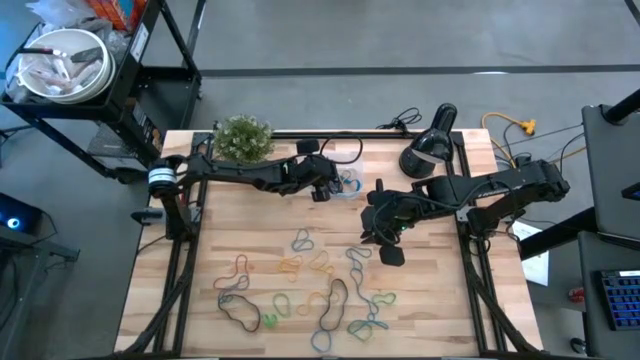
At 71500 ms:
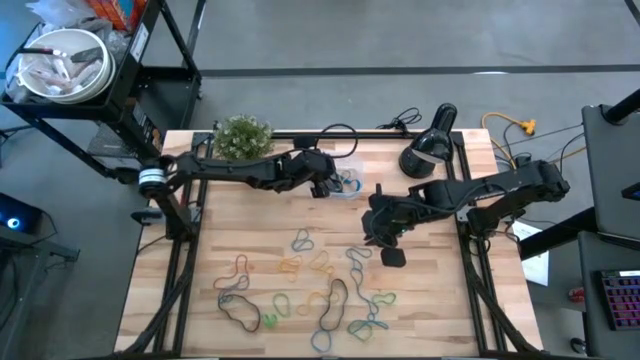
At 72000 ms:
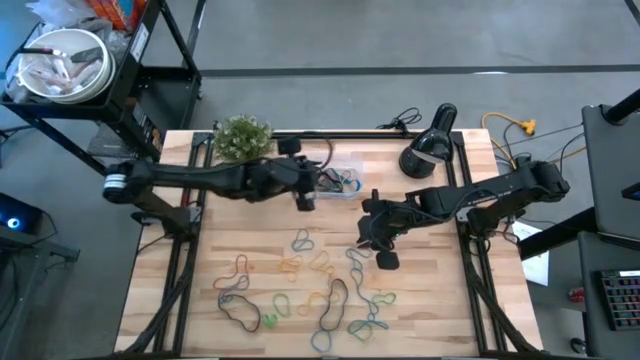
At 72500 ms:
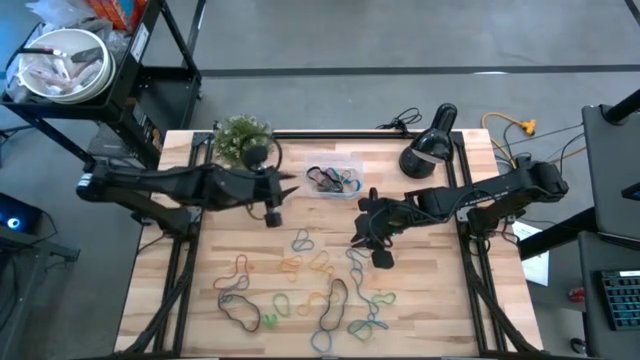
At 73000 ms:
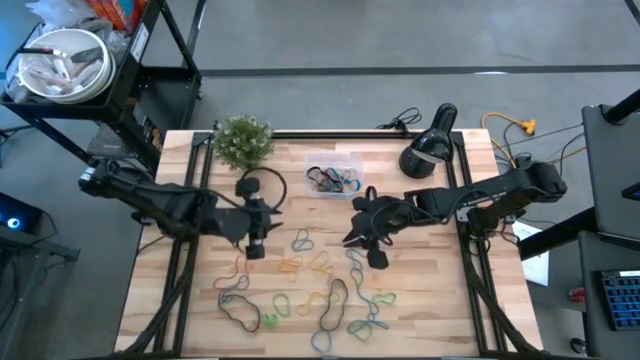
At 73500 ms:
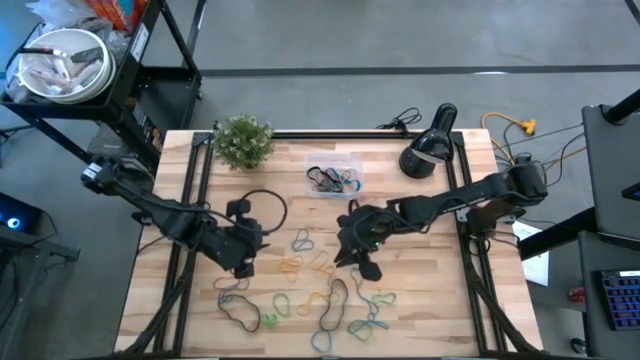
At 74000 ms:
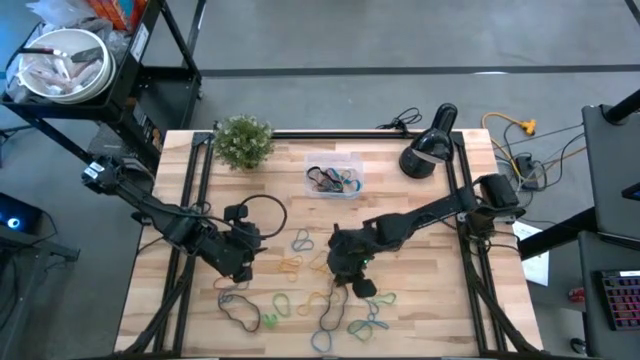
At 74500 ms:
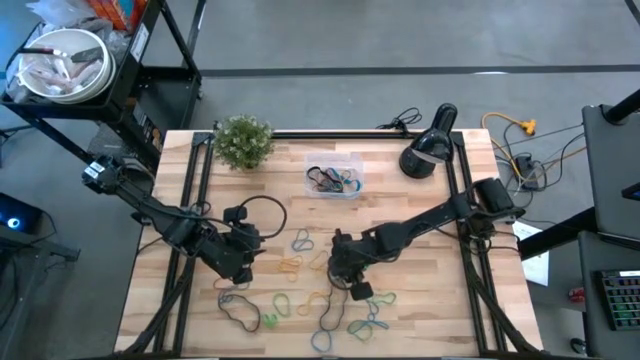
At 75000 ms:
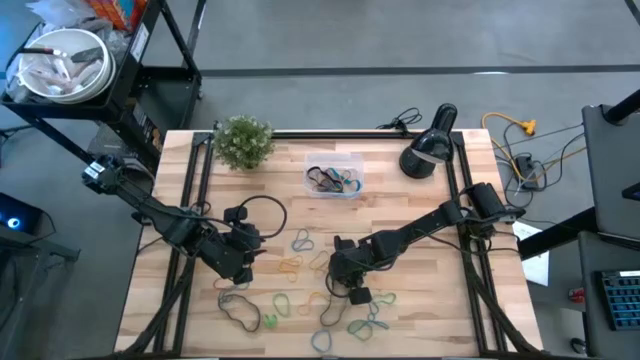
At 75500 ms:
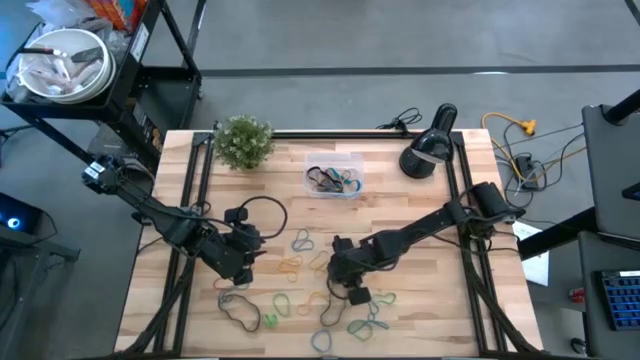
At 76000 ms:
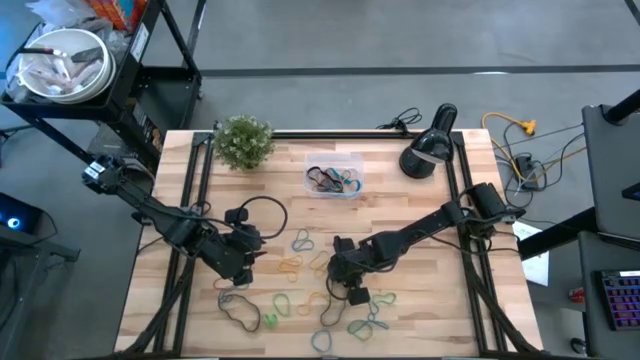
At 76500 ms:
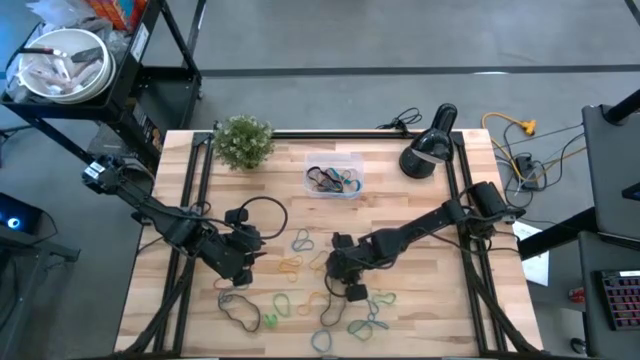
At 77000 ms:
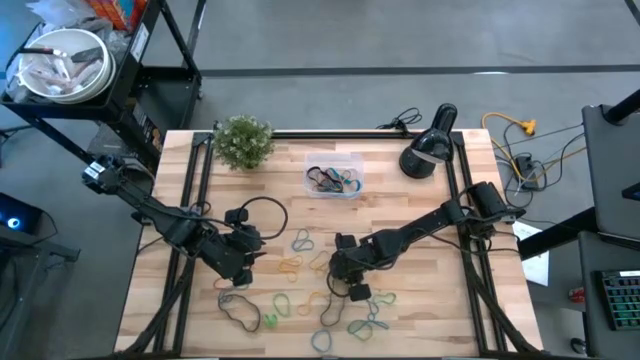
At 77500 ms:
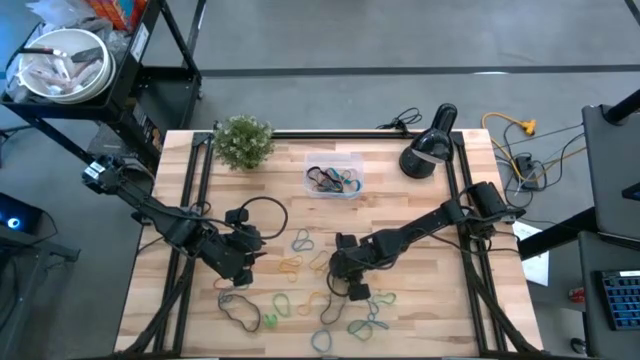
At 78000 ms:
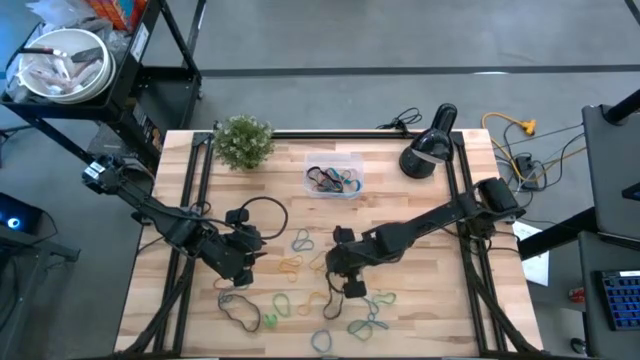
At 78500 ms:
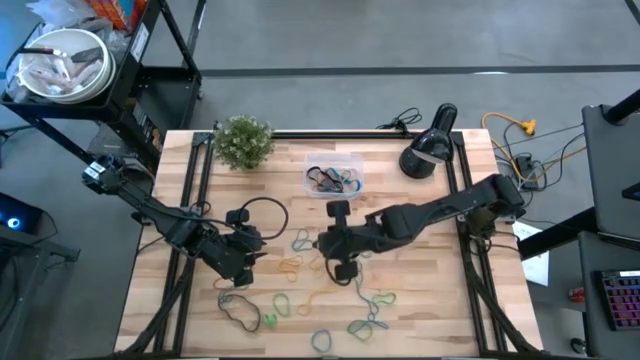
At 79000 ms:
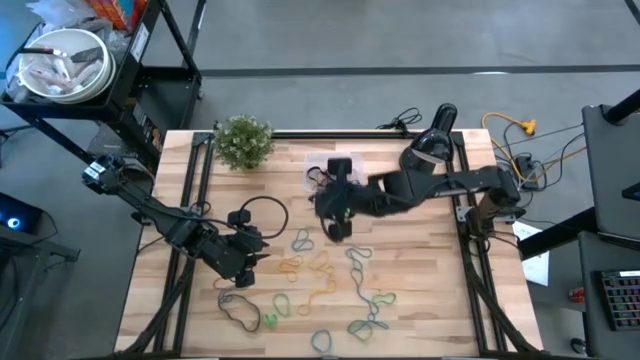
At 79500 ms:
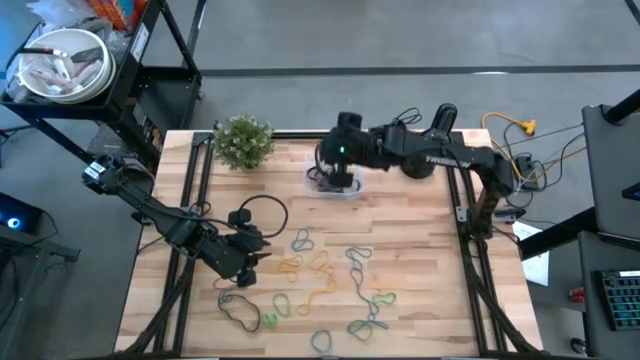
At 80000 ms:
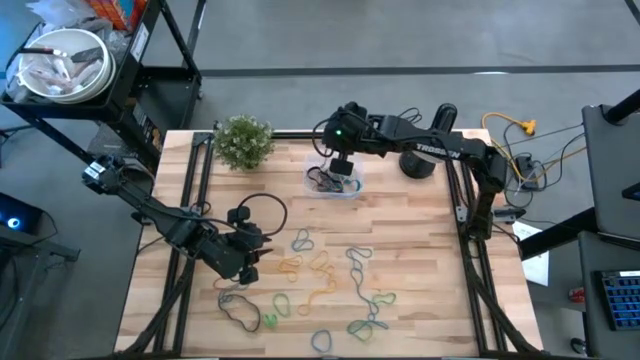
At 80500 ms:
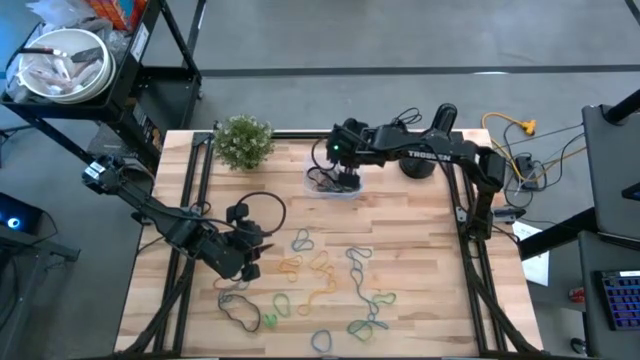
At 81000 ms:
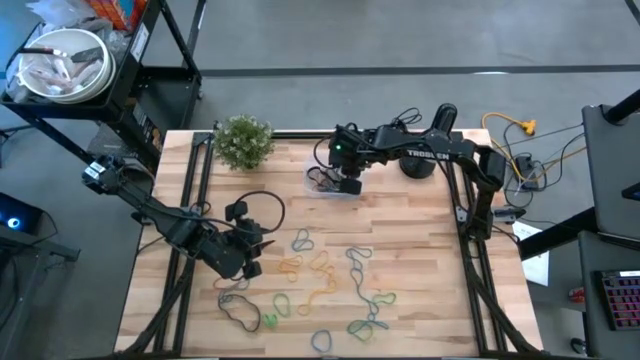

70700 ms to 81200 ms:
Task: Pick and place rubber bands into bin
Put the black rubberband into the transparent bin

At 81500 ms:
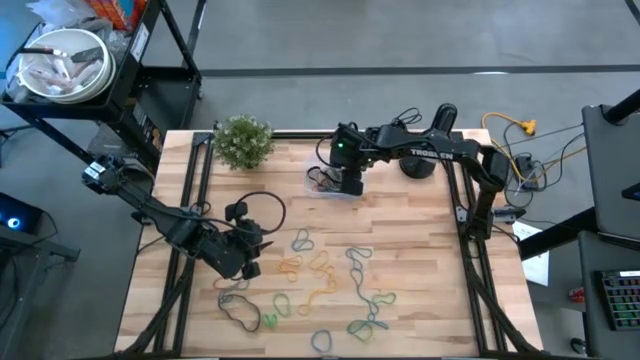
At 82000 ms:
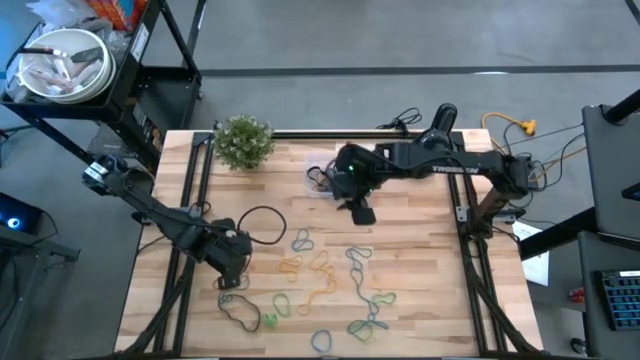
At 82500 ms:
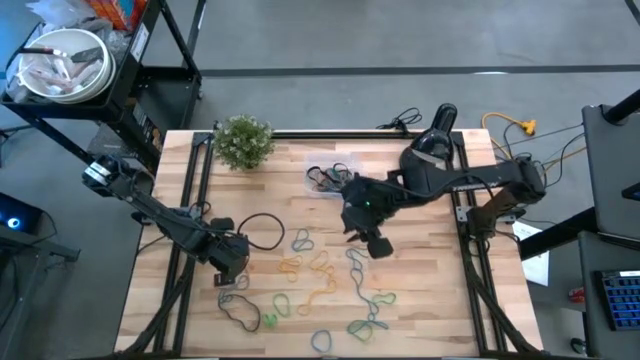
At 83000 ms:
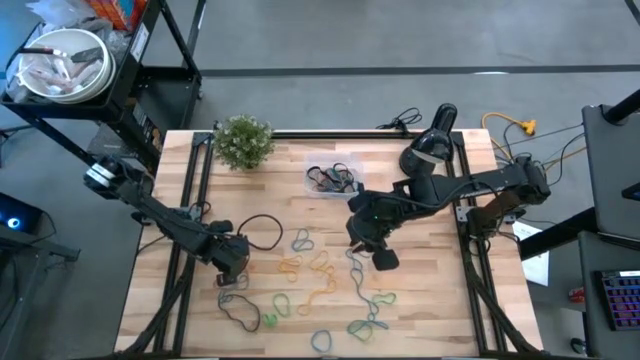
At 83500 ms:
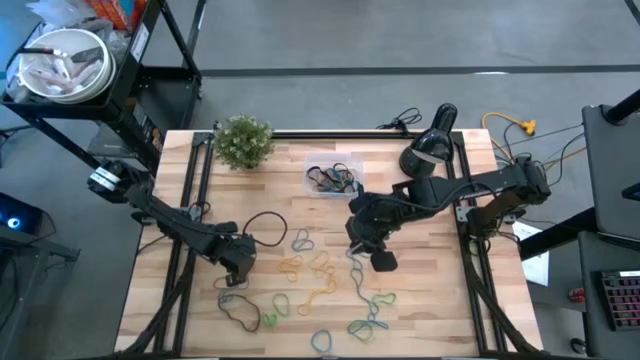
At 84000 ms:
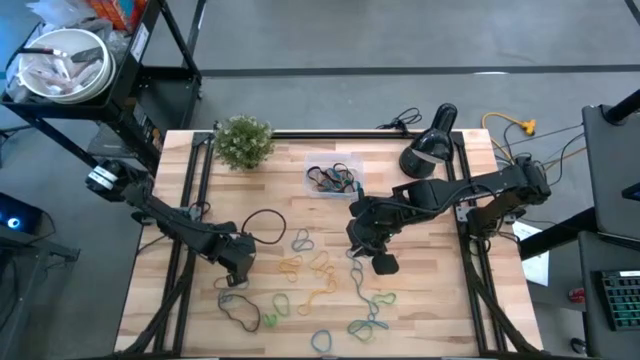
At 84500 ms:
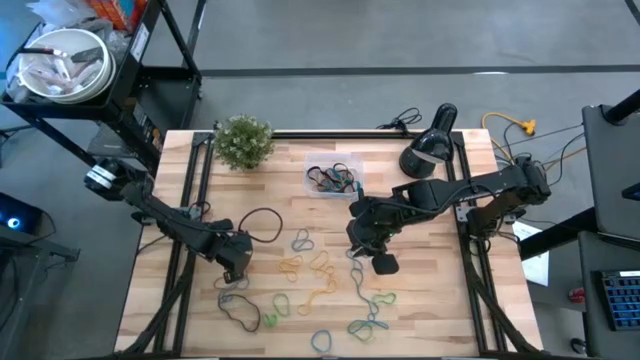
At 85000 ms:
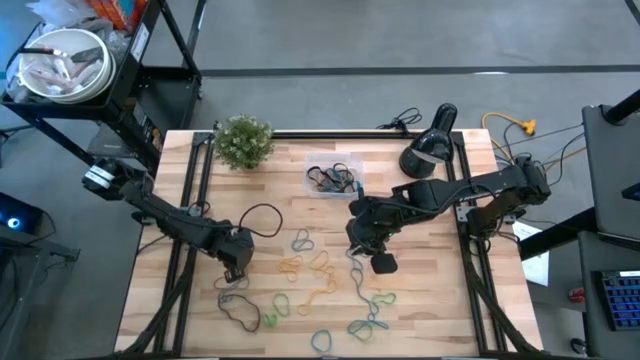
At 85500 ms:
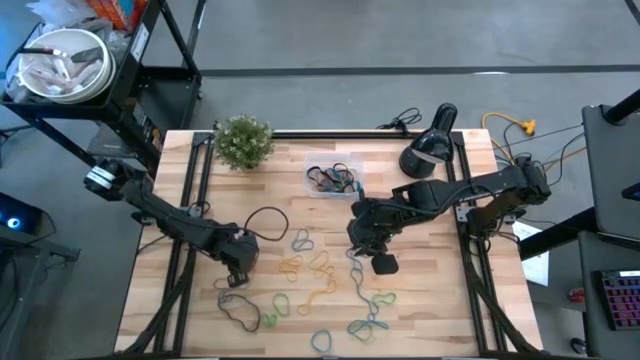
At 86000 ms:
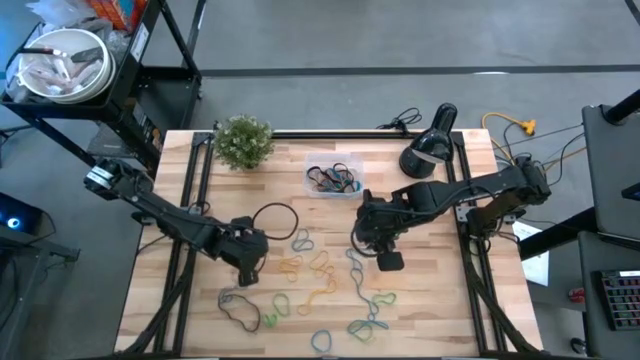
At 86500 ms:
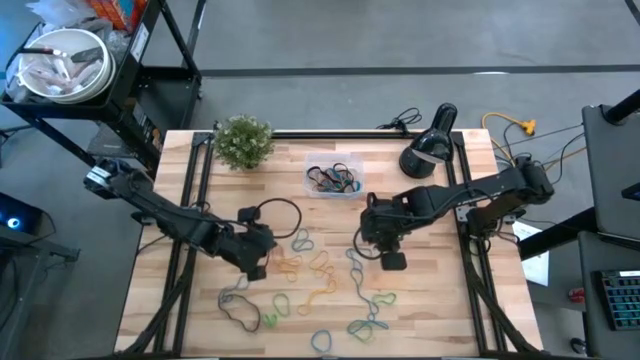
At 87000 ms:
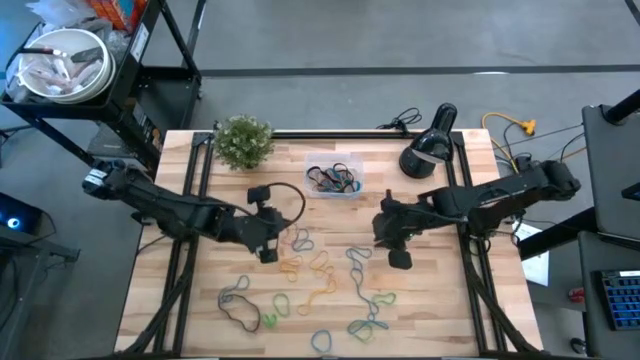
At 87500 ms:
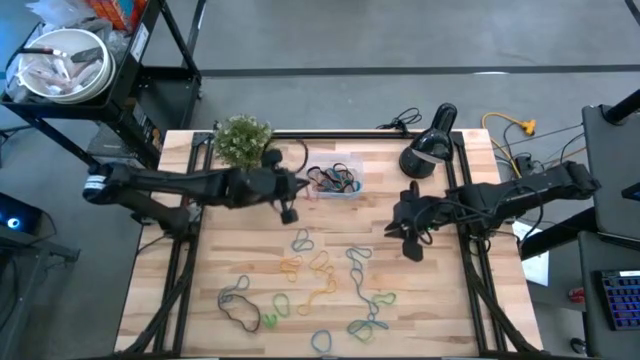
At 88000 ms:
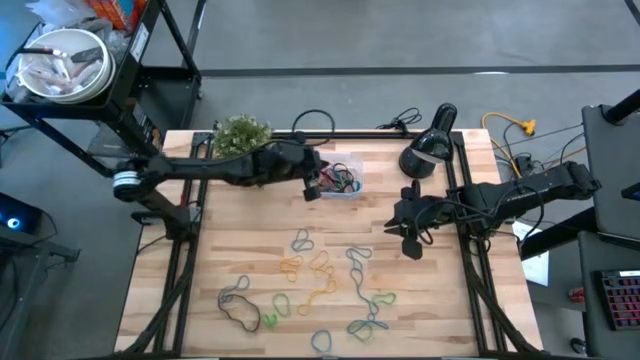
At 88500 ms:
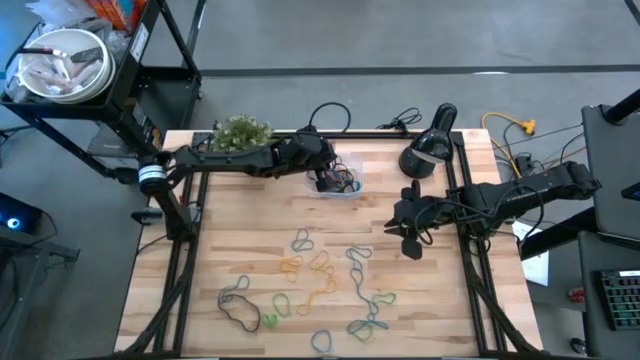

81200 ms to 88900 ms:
Put the red rubberband into the transparent bin

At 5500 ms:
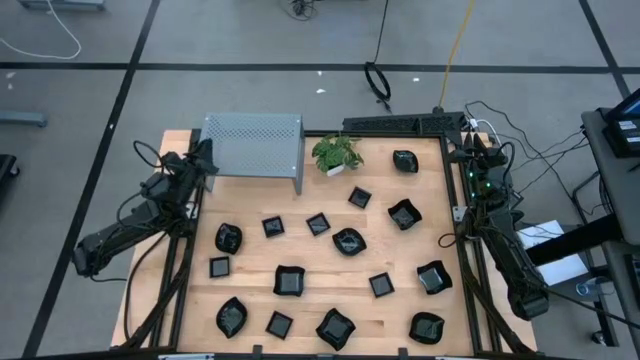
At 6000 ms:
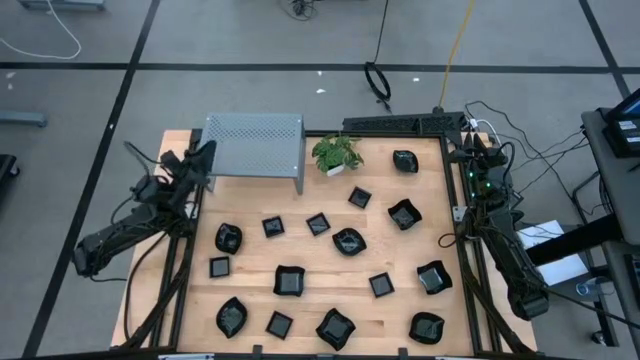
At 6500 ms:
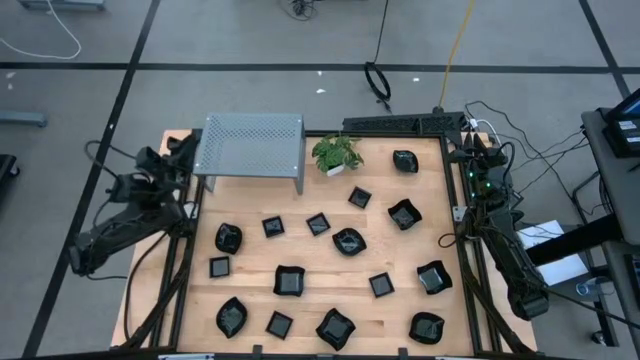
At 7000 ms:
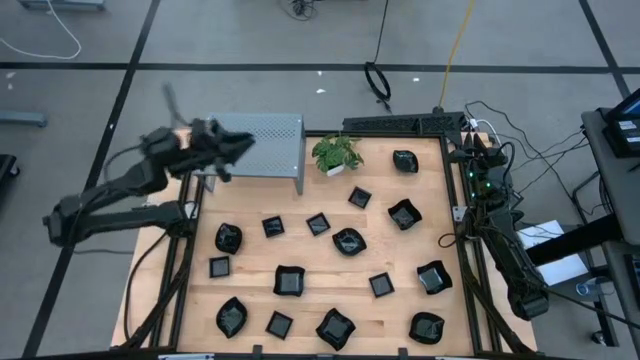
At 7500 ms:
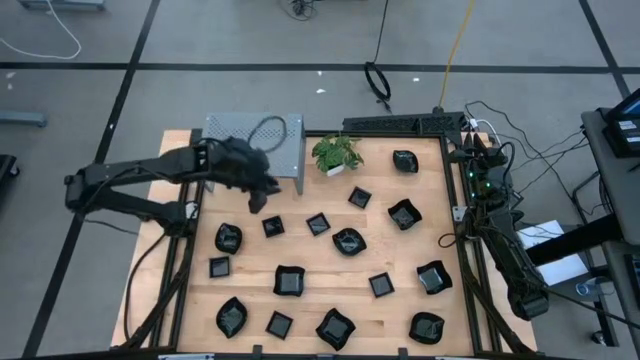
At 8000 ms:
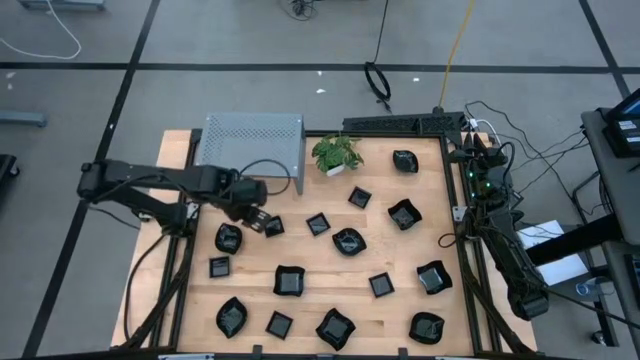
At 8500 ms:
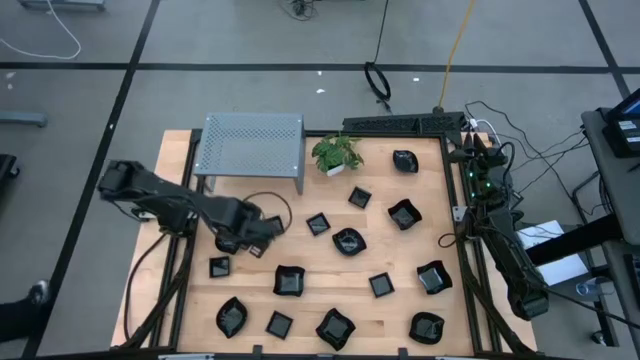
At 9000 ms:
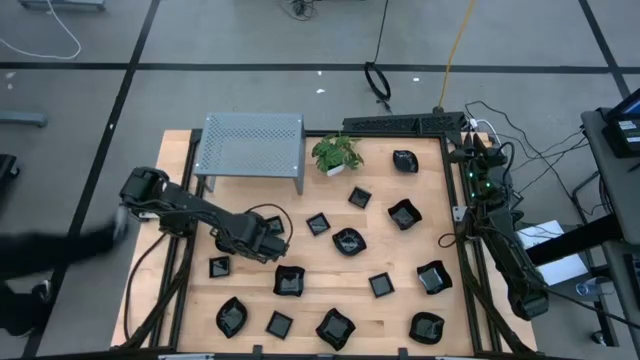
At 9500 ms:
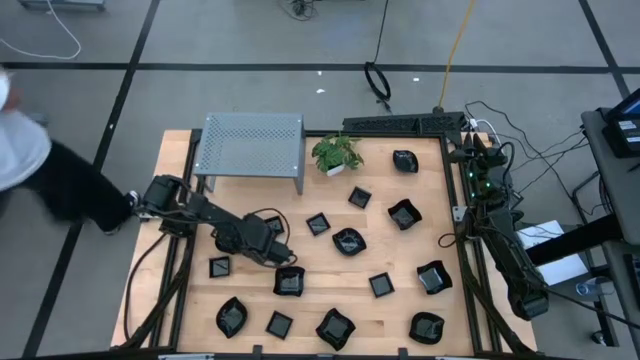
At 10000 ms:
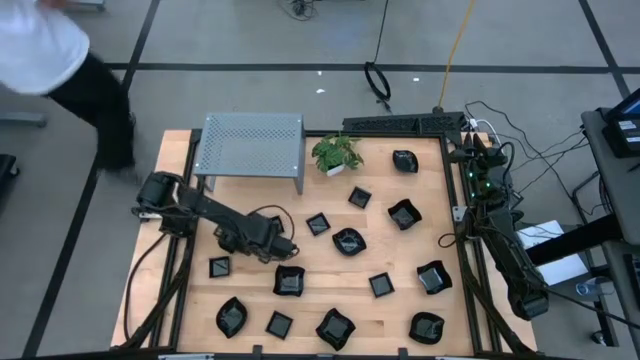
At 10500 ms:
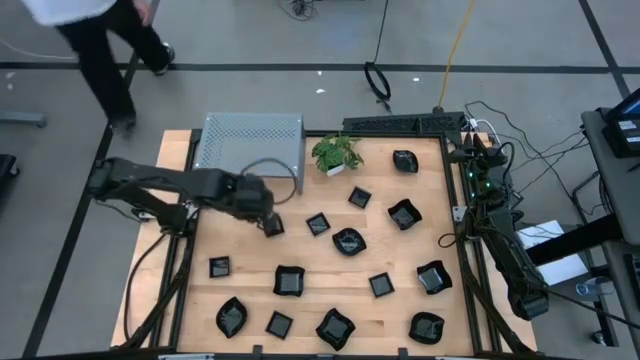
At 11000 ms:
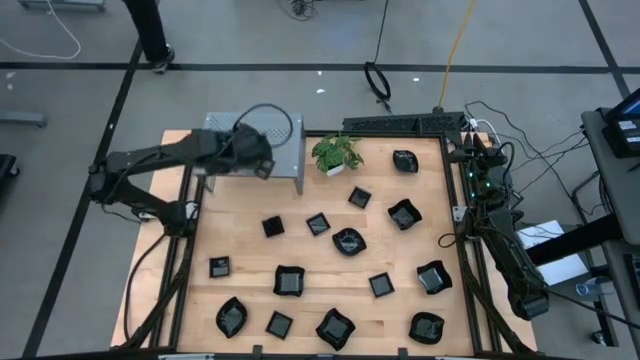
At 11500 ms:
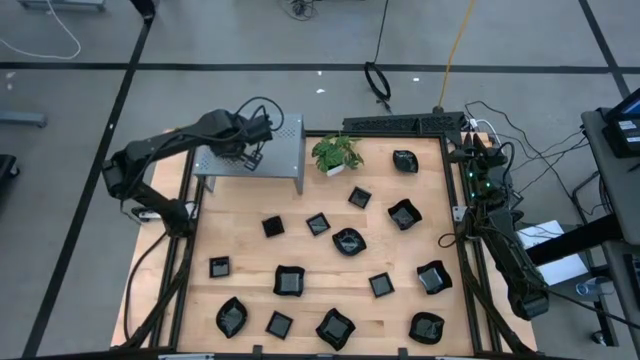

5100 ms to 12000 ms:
Task: Pick & Place Mini shaped plates
Put the black leaf shaped plate on the shelf
